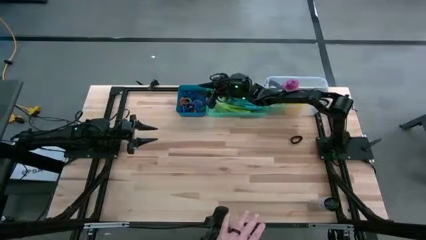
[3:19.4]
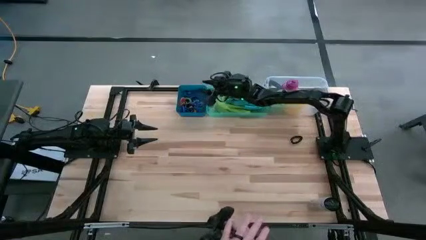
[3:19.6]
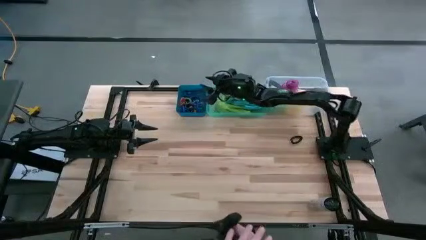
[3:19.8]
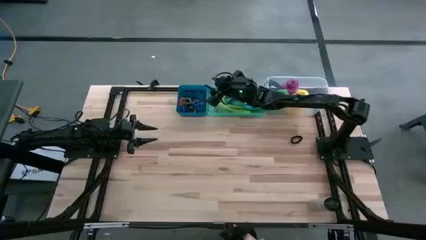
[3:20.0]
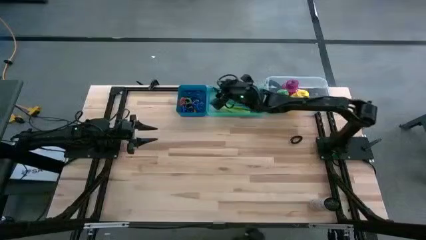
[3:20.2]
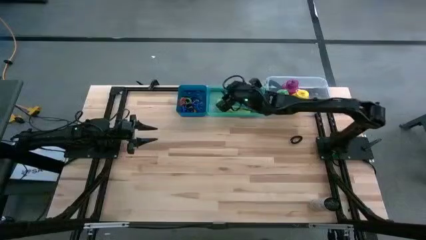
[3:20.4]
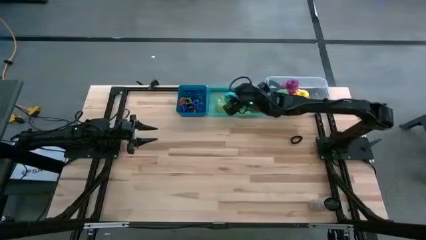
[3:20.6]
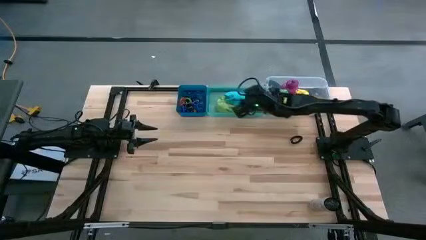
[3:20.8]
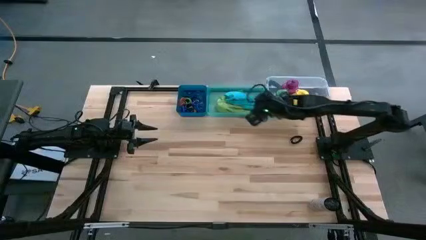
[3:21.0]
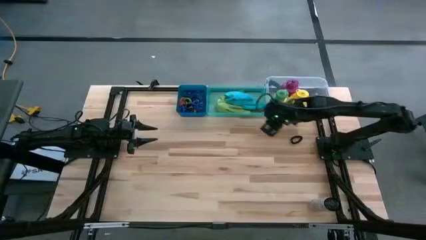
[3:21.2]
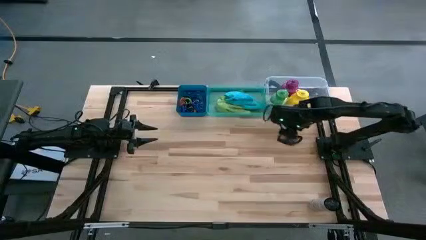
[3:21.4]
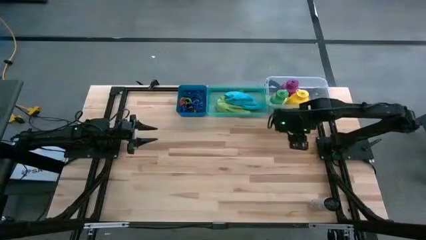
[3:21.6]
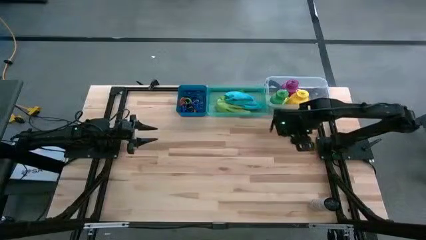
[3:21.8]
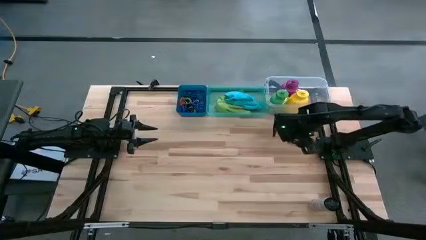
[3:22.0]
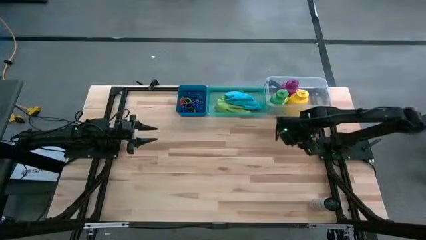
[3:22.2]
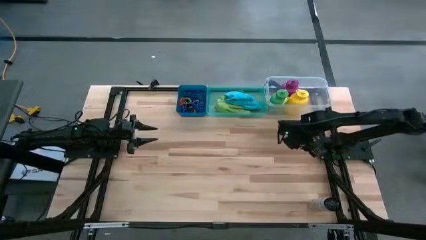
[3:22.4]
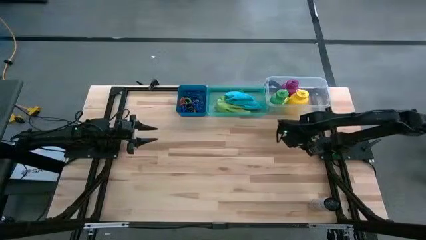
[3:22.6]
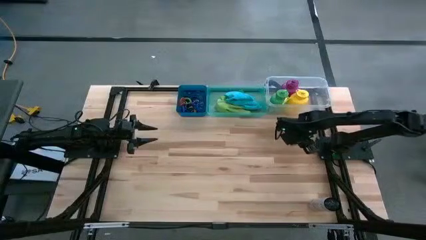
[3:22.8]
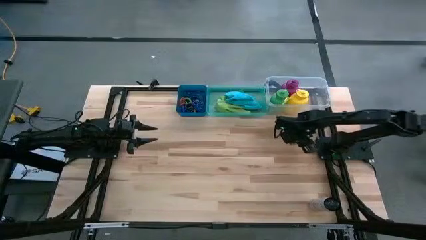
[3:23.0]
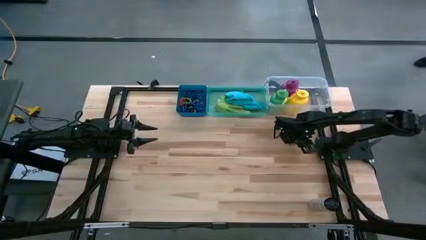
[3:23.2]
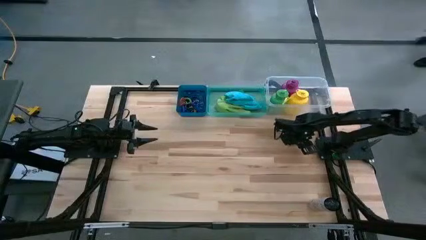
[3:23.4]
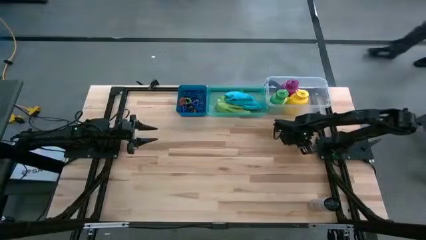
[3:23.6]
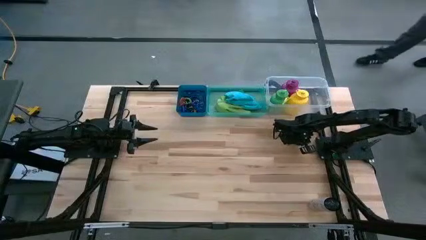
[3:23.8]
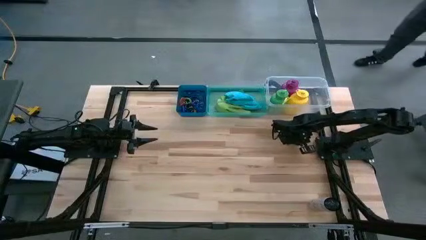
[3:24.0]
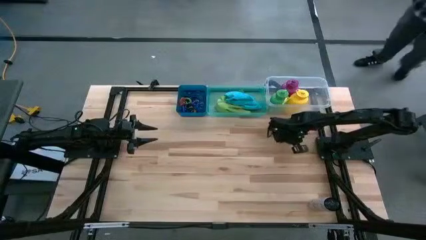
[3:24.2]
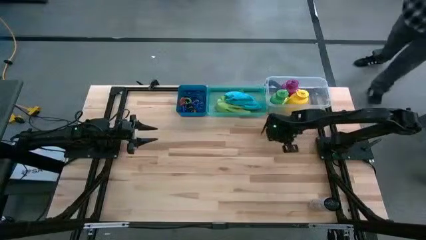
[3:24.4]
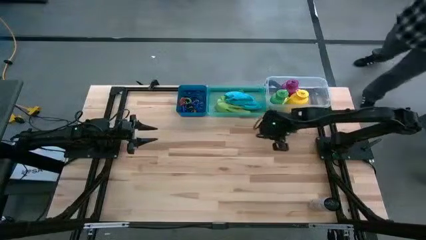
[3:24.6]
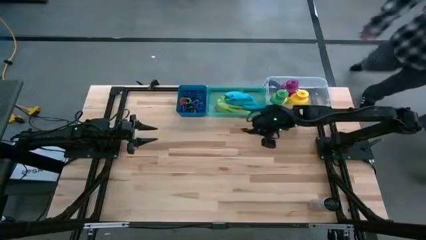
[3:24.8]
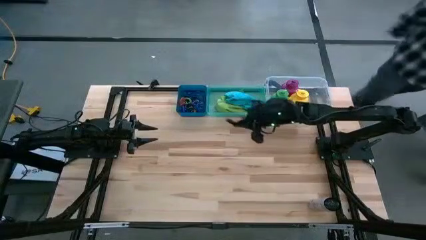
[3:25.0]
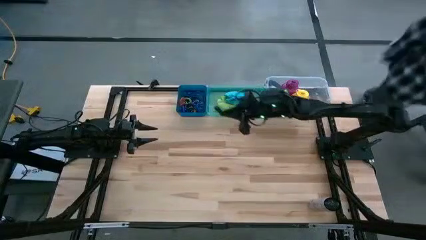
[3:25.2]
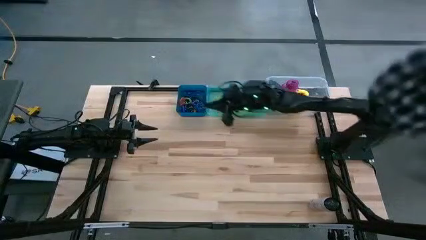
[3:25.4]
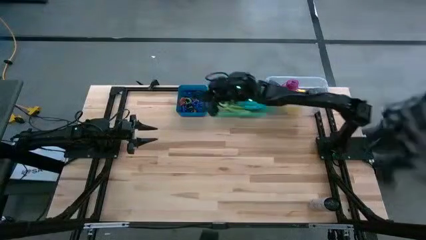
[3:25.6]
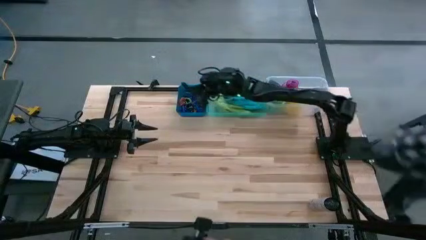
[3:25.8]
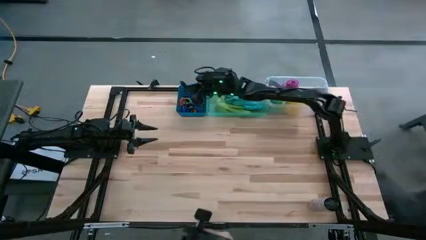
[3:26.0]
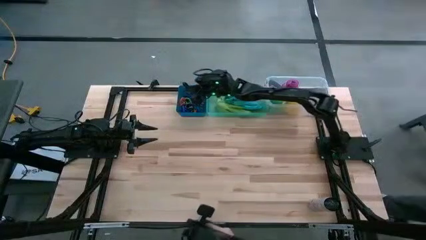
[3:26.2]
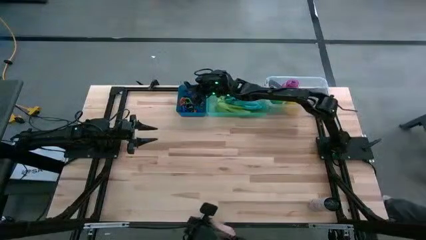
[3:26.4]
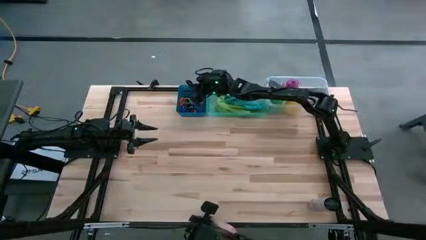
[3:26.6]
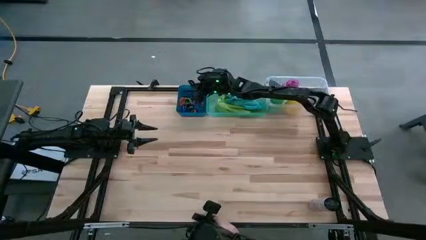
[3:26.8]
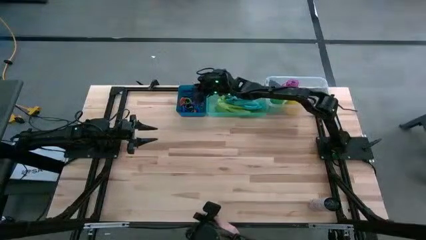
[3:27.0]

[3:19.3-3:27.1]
Task: Pick & Place Sports Items
Put the black spring keychain into the blue bin

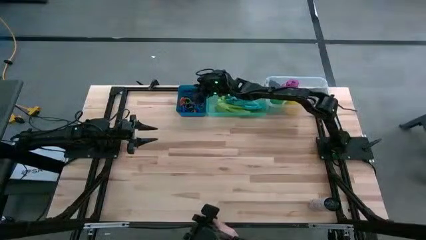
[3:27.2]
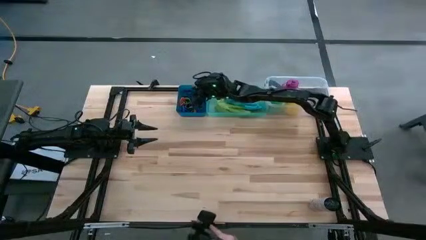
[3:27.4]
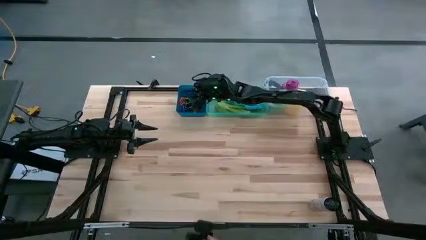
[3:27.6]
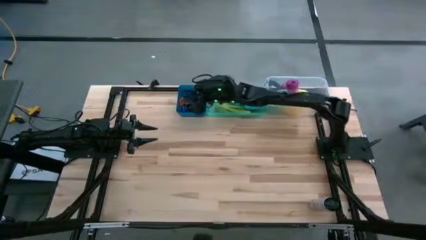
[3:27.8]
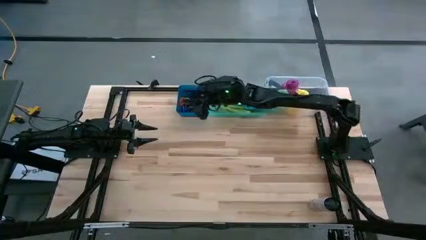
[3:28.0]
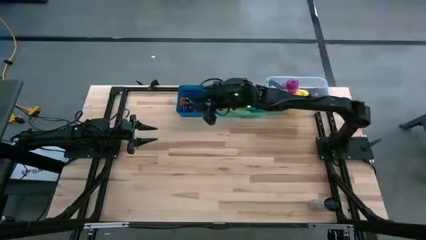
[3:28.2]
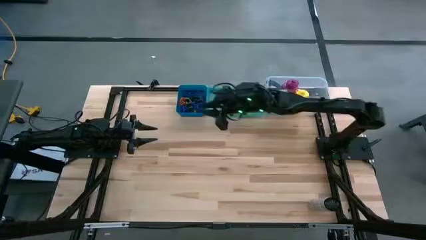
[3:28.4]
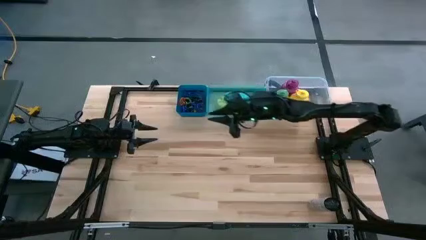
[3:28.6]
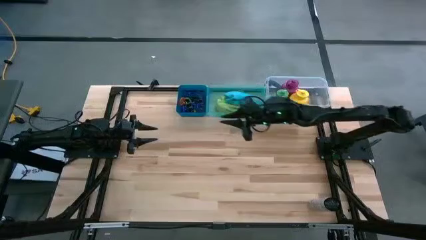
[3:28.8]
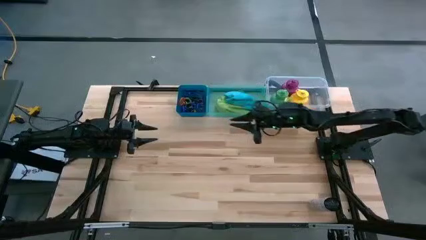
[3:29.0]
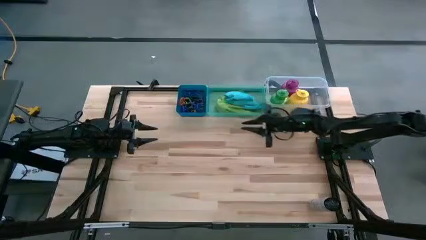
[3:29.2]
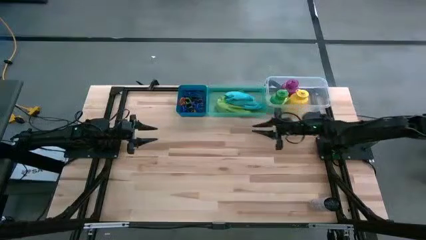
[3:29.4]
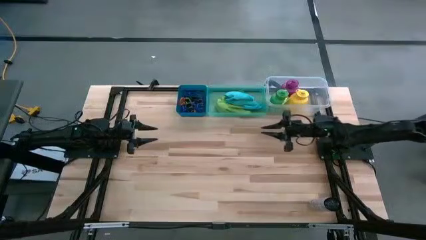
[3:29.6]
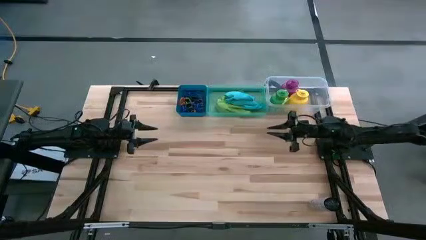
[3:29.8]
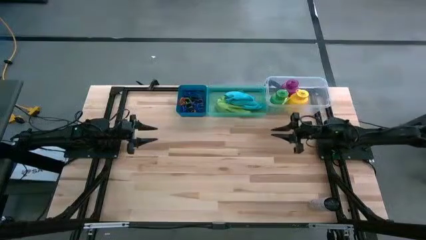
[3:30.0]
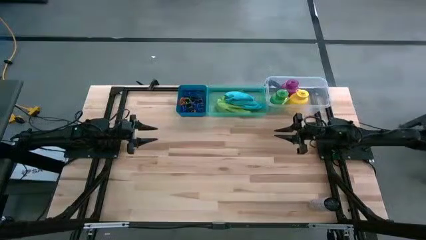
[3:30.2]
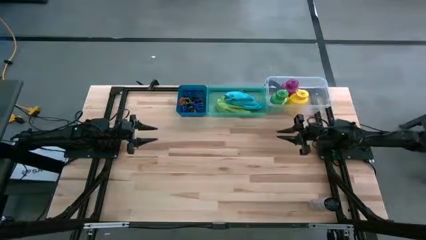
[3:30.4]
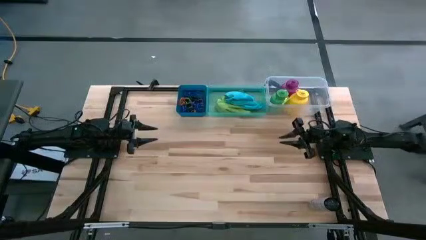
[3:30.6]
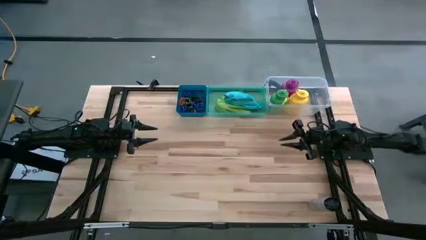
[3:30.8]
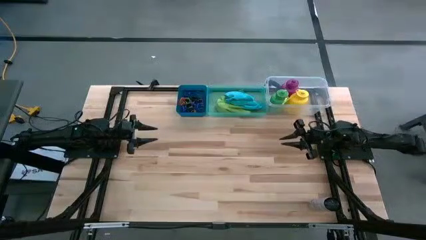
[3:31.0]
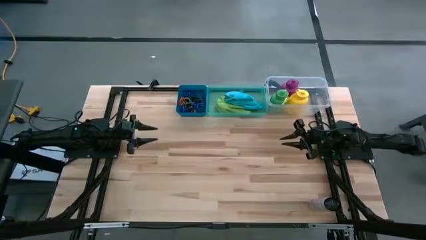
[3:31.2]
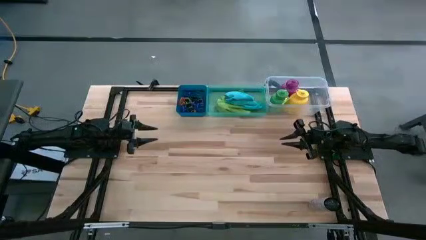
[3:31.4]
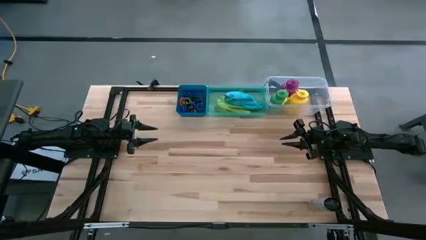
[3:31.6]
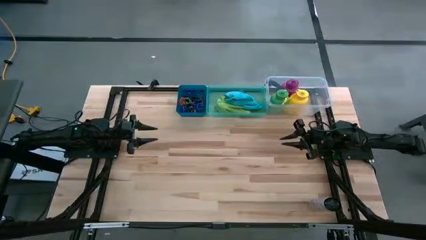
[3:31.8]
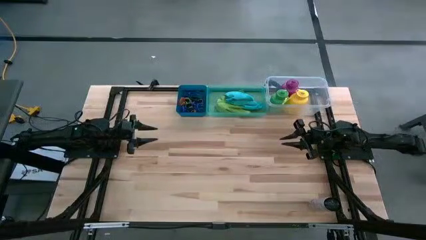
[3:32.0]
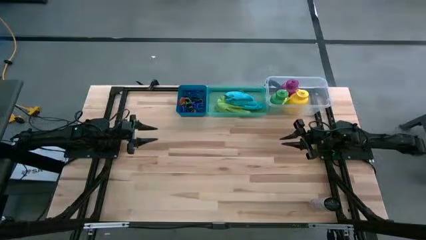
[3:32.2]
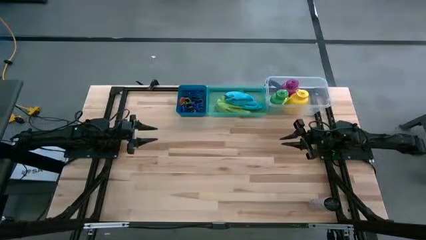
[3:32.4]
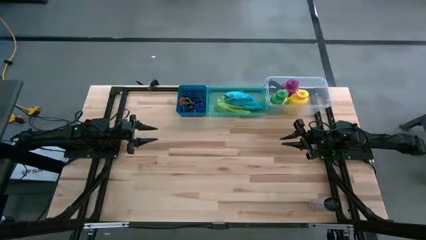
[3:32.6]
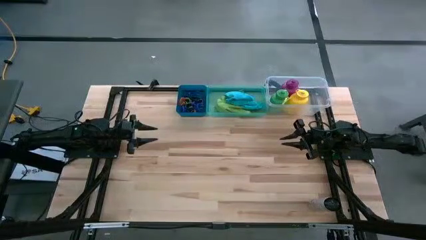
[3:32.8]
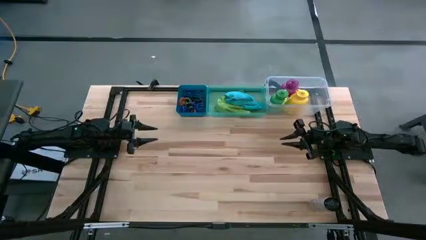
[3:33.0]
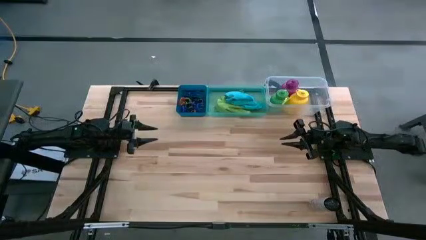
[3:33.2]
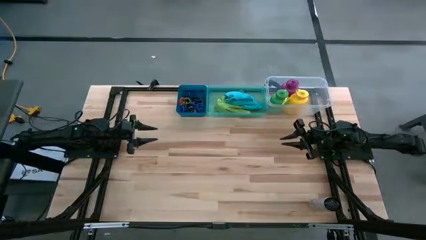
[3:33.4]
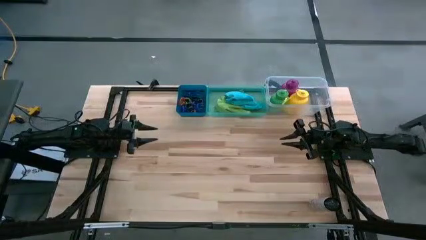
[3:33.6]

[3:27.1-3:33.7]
Return to Home Position

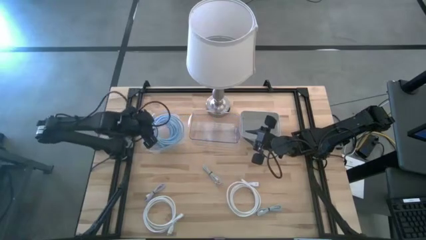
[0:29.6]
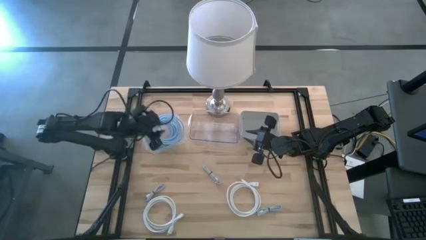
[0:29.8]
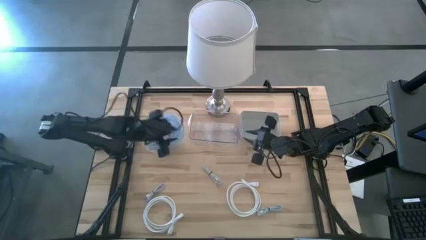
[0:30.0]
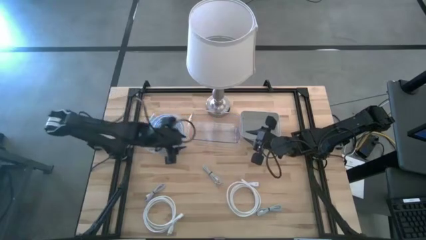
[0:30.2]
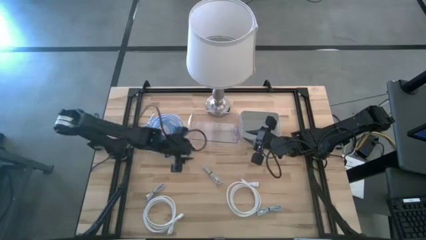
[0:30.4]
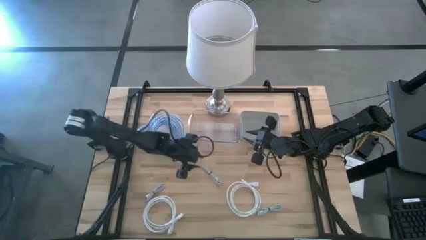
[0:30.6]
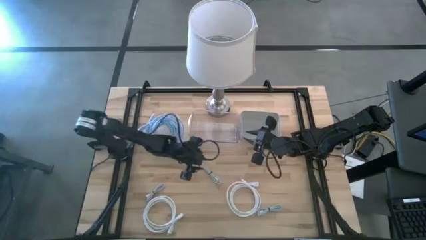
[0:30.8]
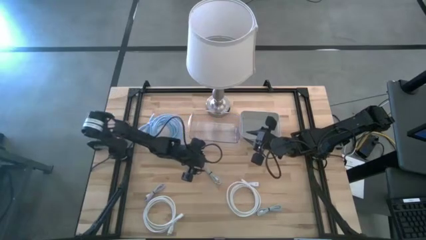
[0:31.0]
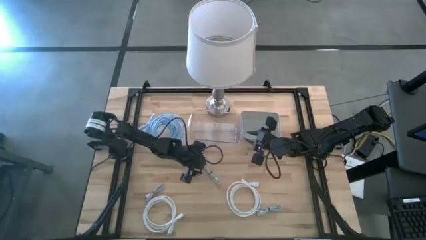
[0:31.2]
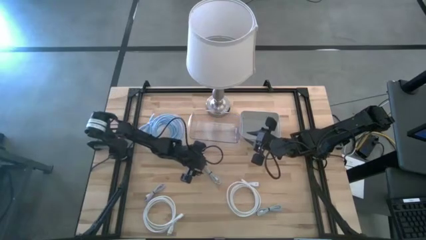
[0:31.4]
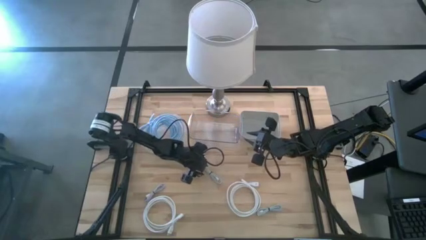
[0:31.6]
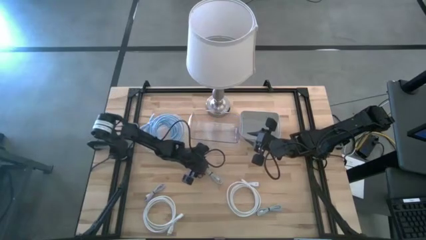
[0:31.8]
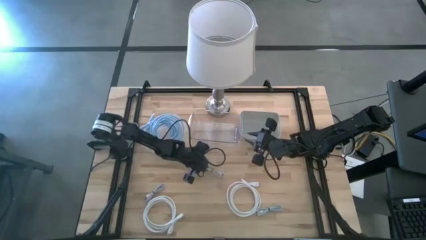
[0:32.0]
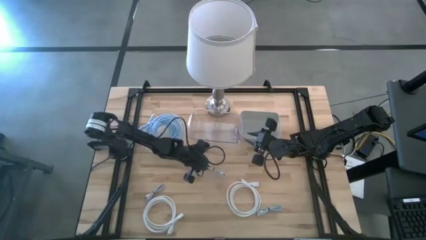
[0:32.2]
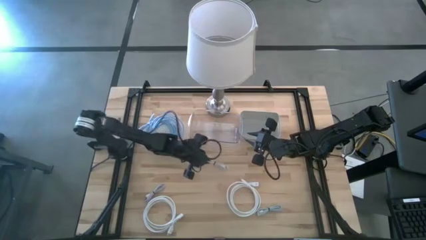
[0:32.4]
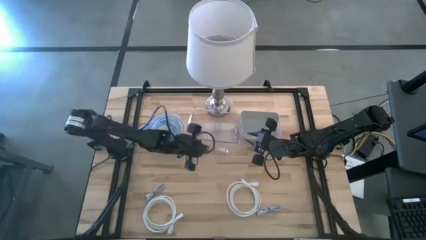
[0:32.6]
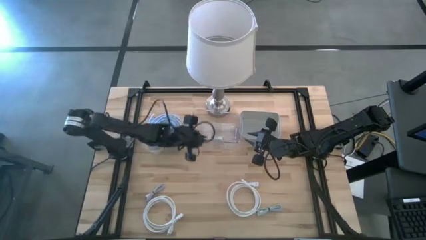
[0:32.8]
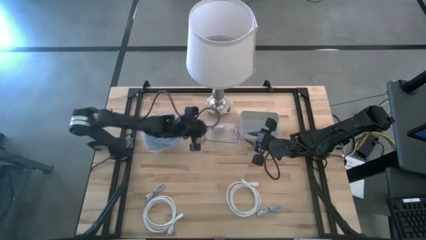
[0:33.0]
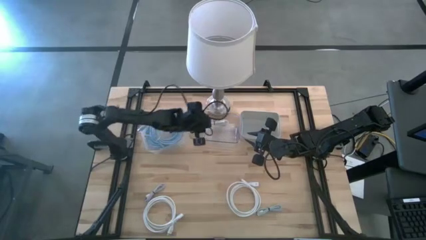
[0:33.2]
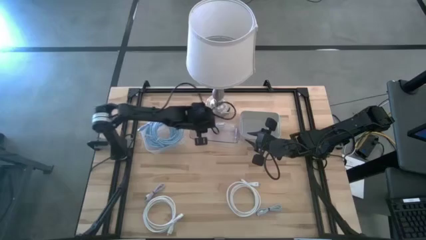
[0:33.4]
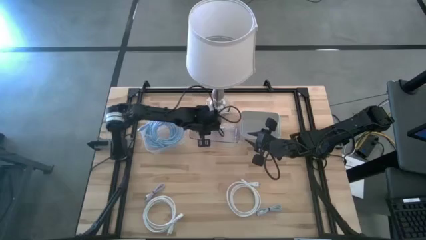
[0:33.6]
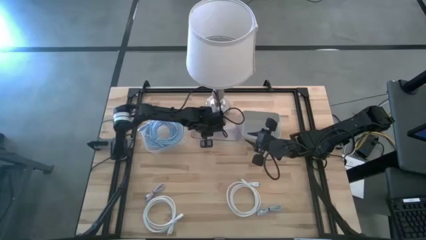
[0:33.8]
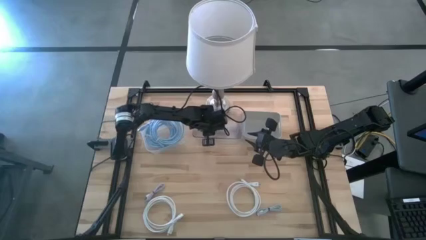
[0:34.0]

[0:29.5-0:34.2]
Task: Pick & Place USB Port
Put the gray usb cable into the transparent bin
